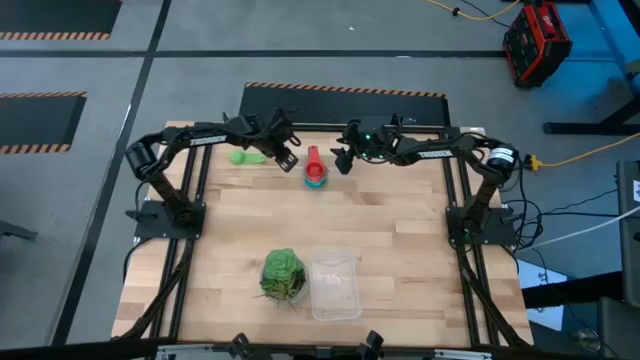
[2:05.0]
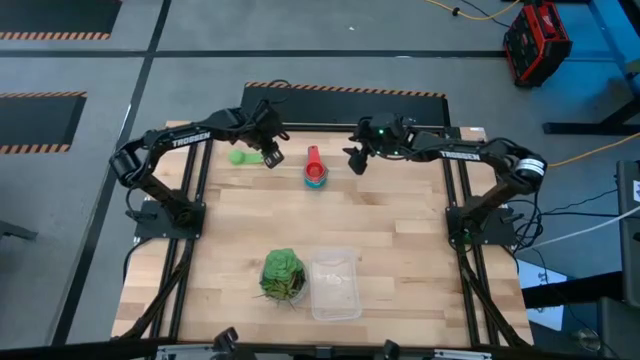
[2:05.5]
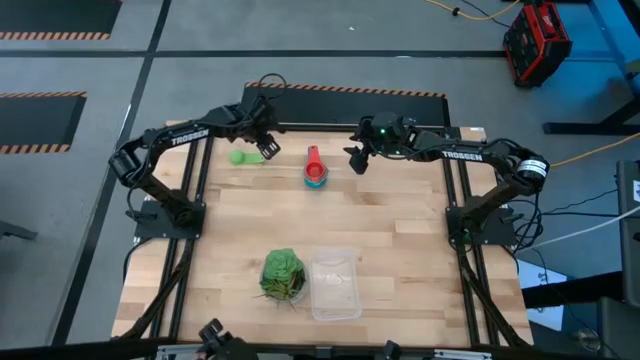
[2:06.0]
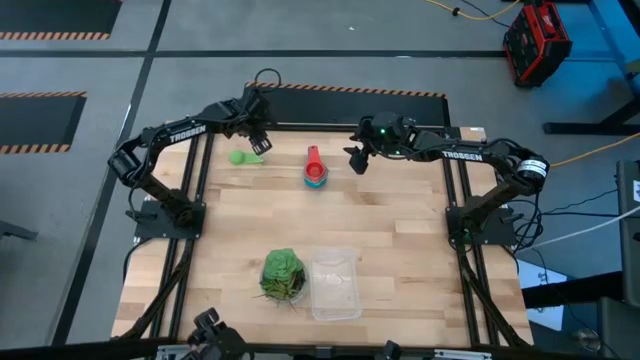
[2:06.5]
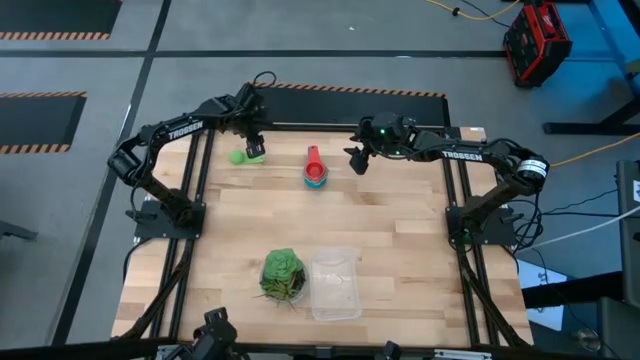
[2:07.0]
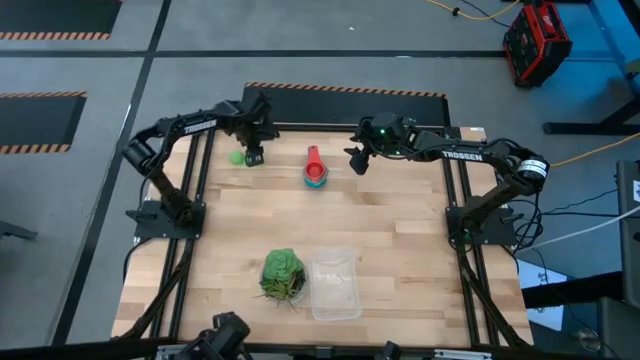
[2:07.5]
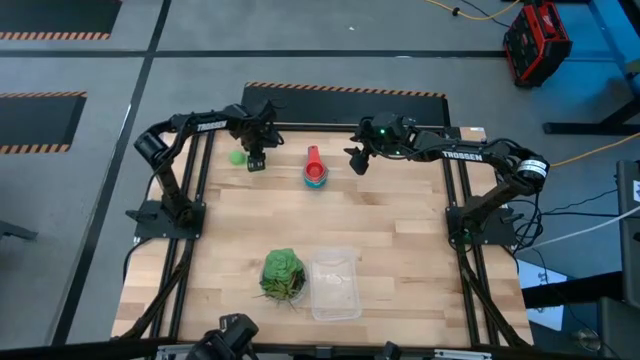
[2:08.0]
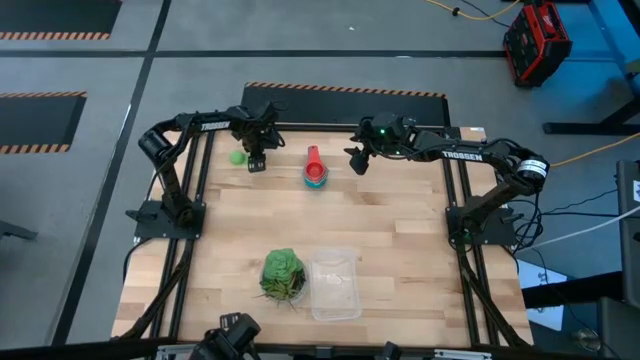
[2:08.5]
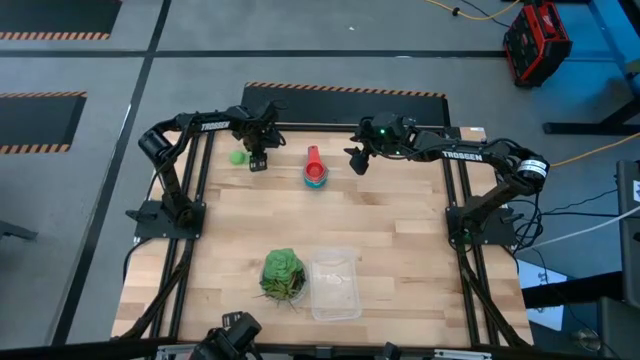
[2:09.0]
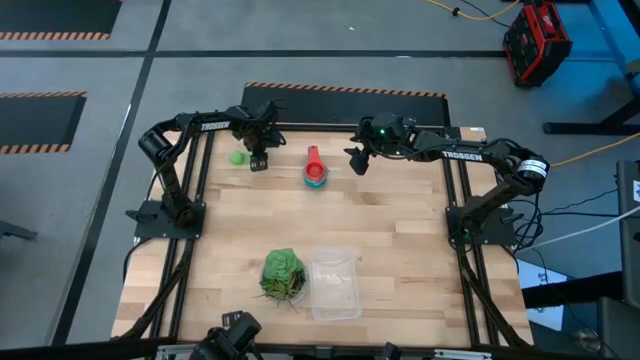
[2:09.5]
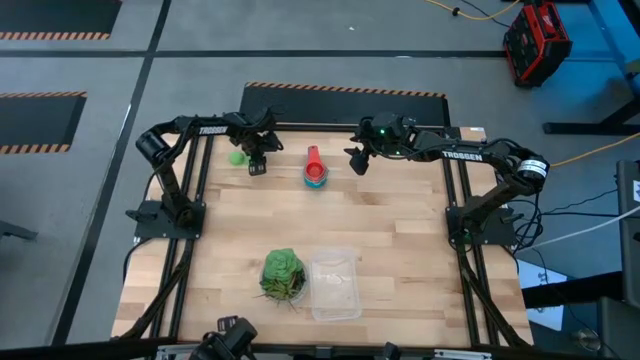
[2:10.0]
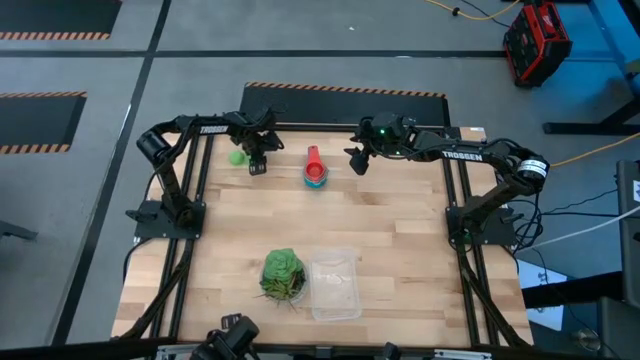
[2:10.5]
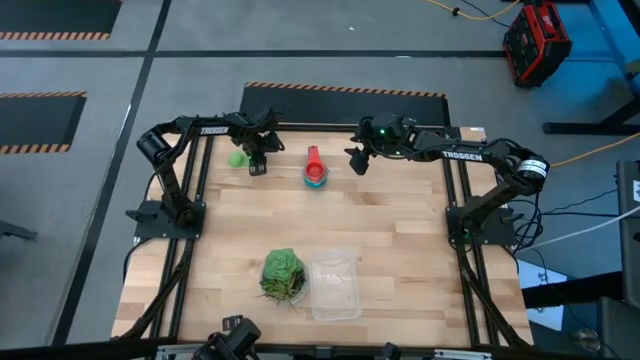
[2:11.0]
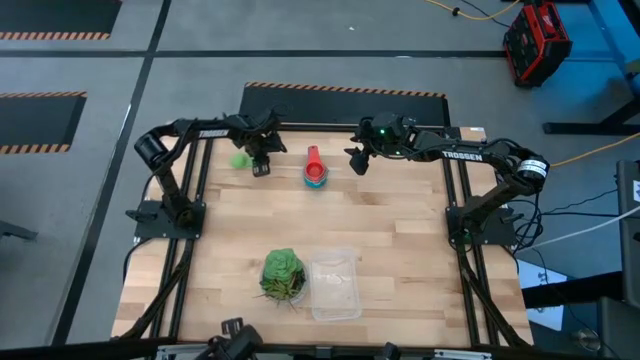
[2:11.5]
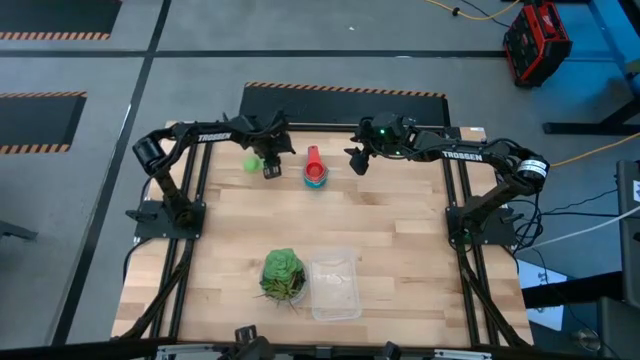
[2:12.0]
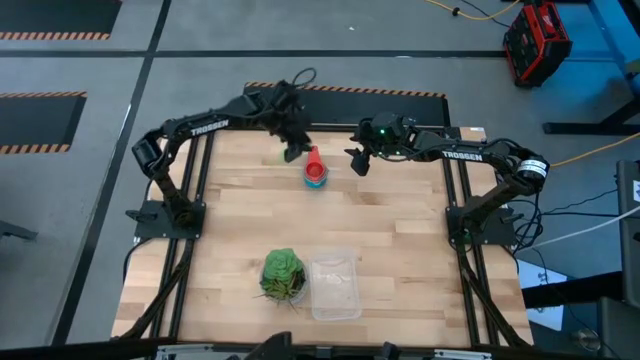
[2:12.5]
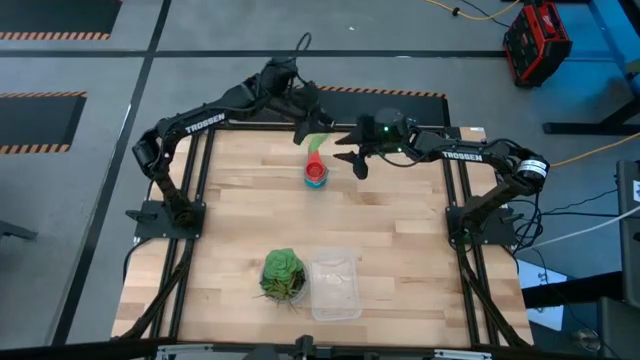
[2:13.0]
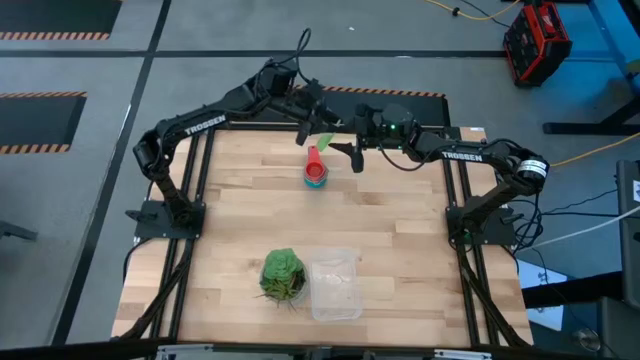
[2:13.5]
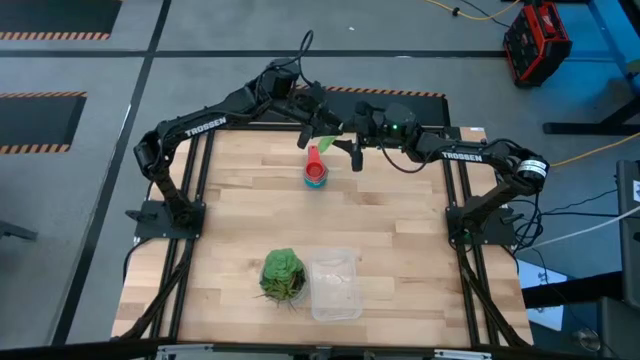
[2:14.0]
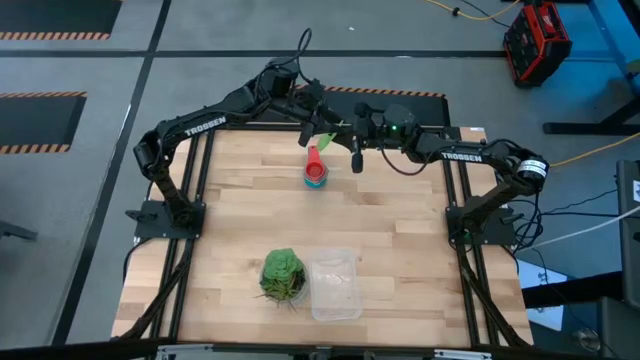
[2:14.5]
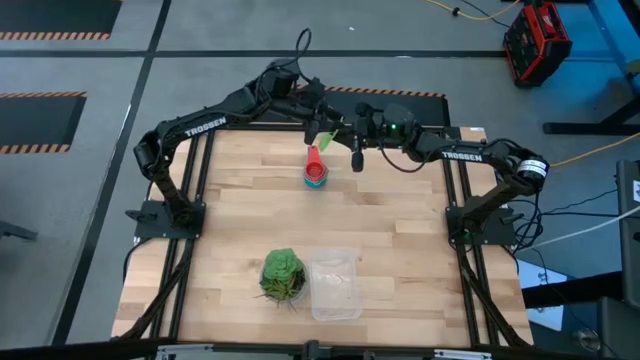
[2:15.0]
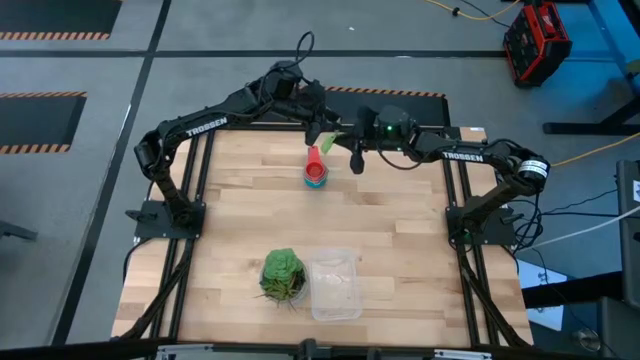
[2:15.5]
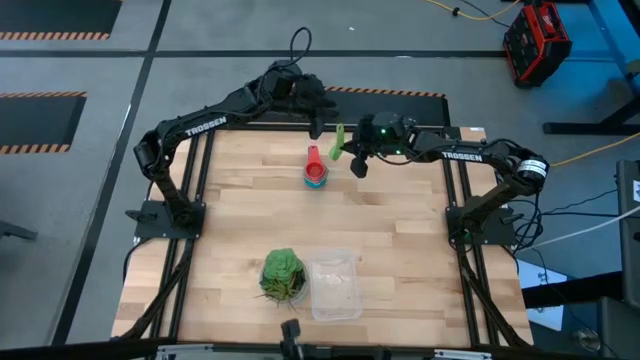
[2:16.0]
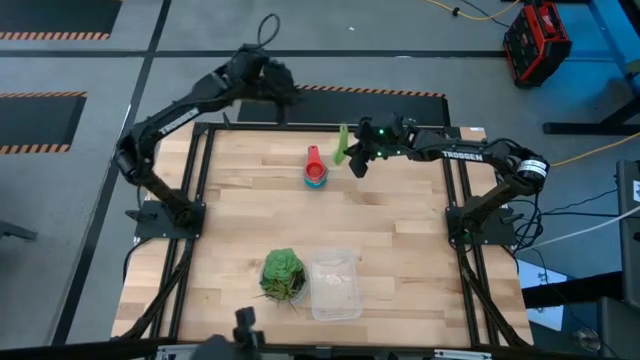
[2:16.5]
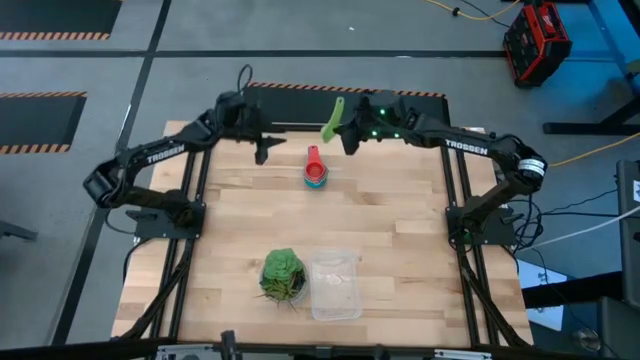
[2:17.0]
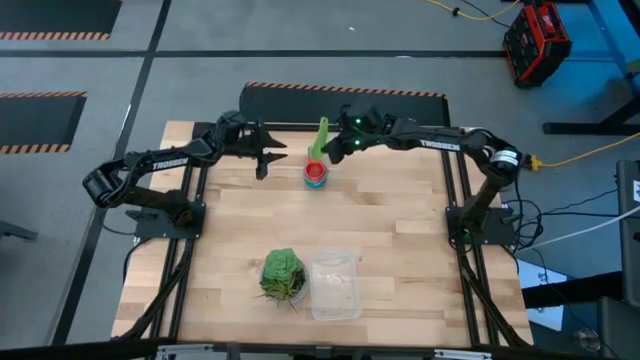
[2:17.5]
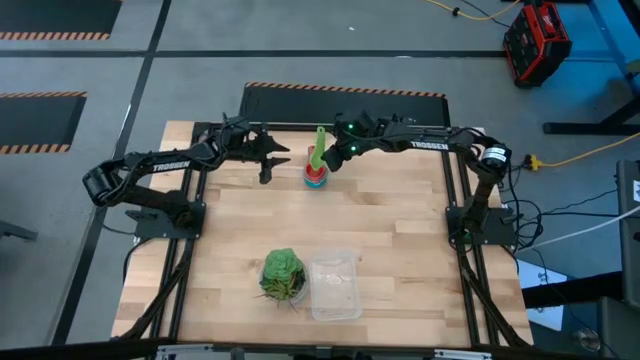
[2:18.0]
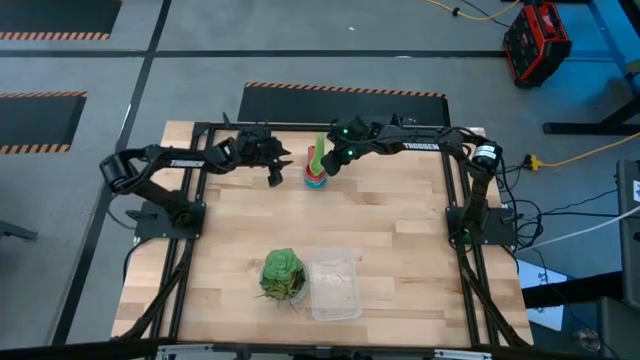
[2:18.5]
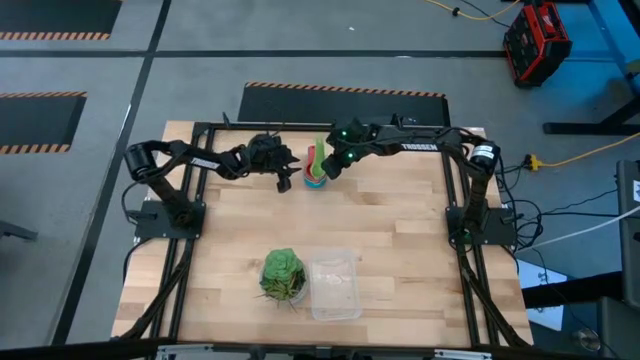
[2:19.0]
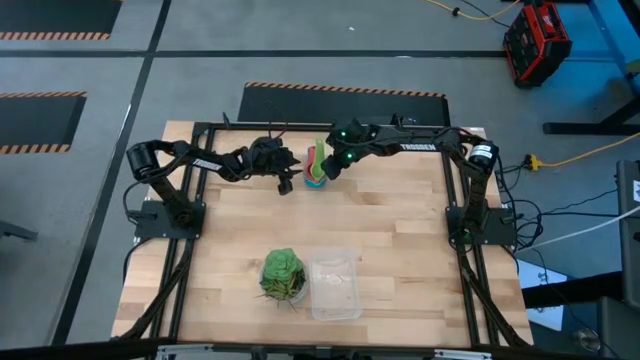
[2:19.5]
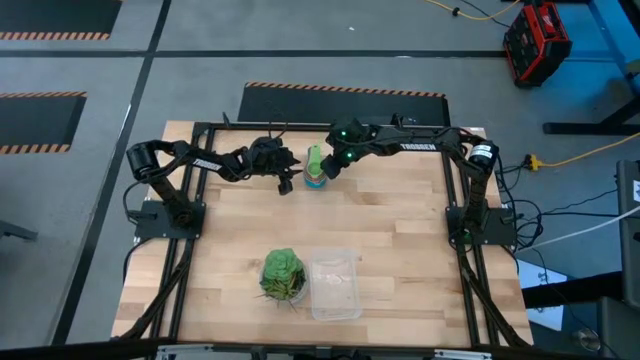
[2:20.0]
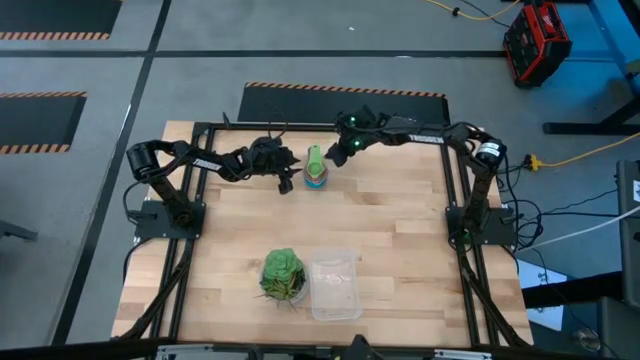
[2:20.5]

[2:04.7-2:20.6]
Task: Nest measuring cups in basket
Stack the green measuring cup on top of the red measuring cup
